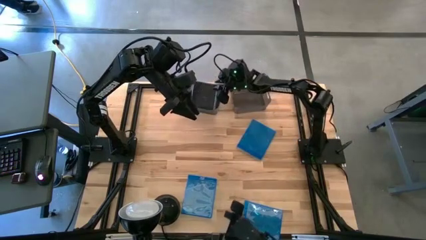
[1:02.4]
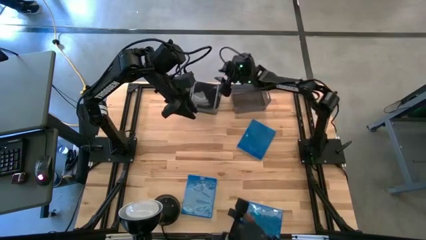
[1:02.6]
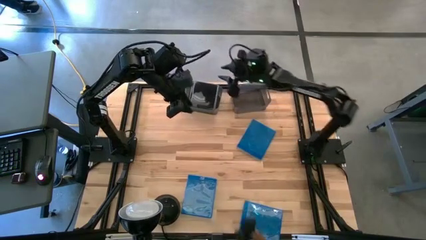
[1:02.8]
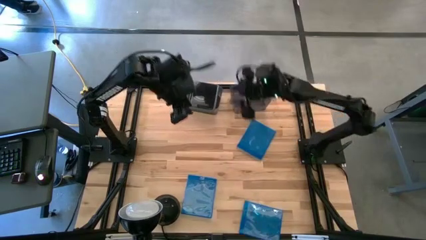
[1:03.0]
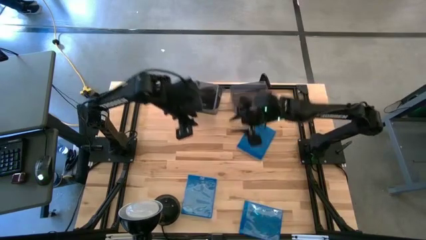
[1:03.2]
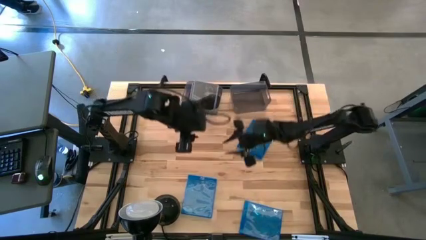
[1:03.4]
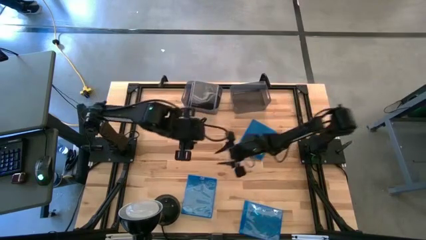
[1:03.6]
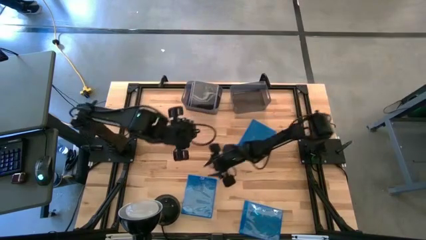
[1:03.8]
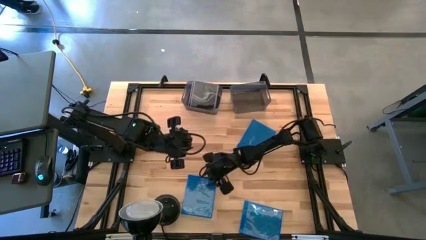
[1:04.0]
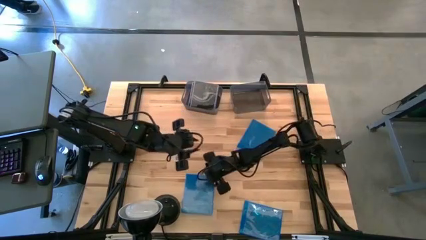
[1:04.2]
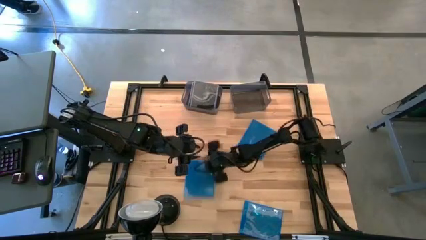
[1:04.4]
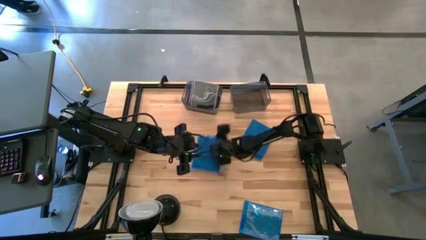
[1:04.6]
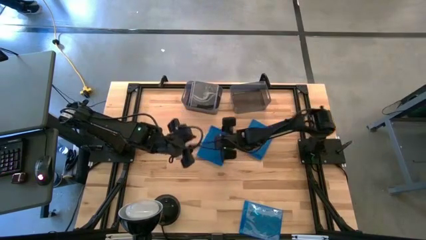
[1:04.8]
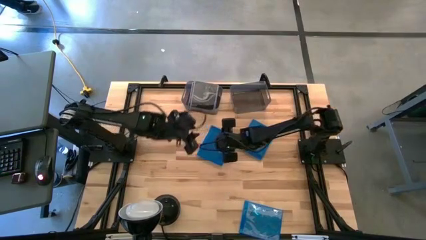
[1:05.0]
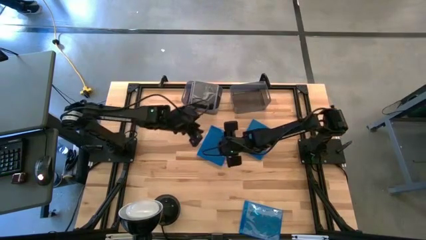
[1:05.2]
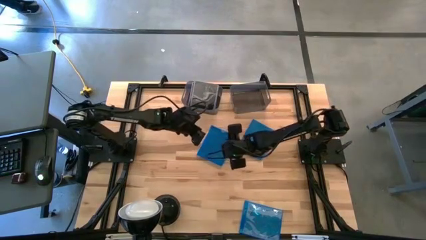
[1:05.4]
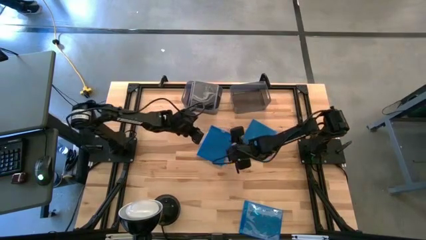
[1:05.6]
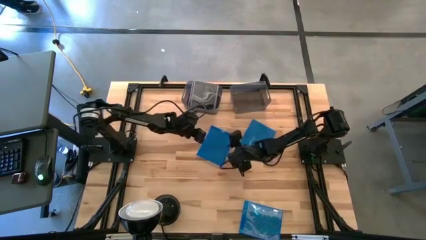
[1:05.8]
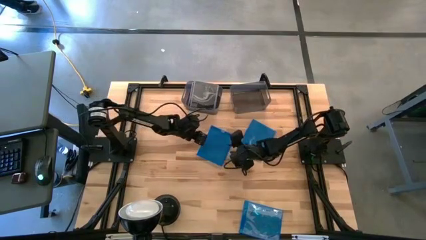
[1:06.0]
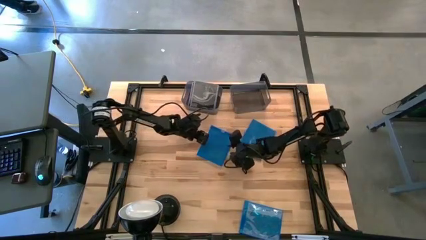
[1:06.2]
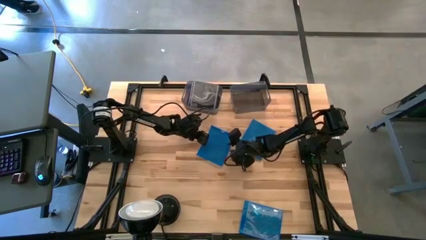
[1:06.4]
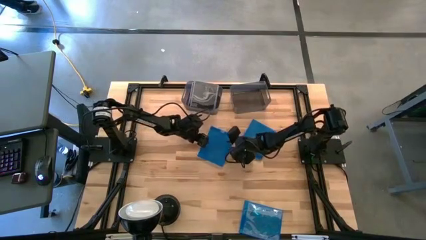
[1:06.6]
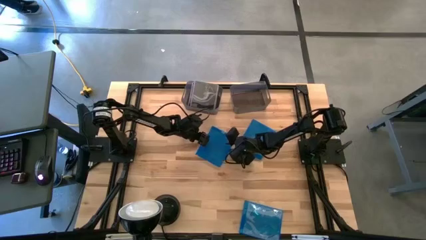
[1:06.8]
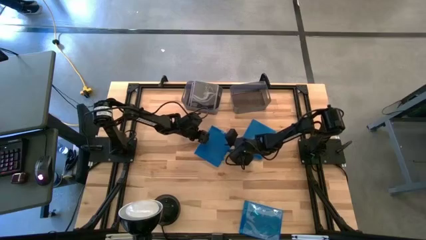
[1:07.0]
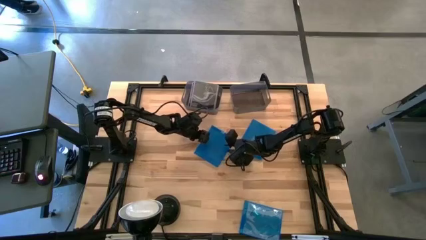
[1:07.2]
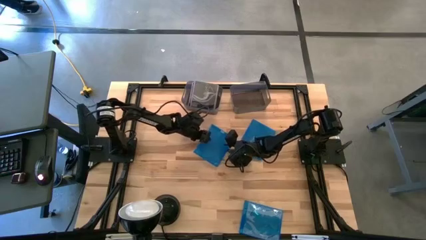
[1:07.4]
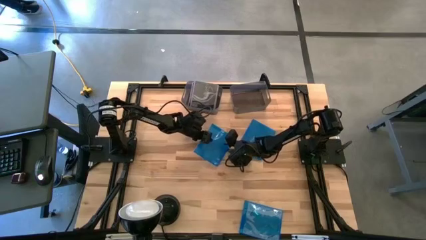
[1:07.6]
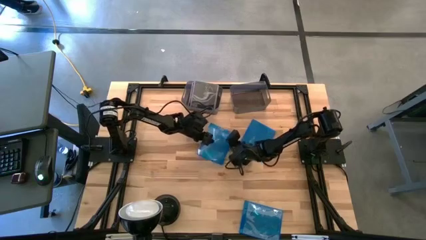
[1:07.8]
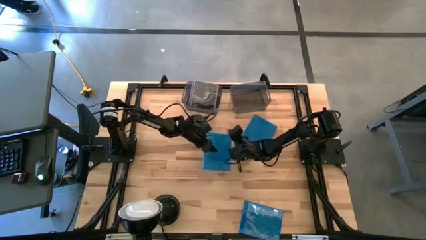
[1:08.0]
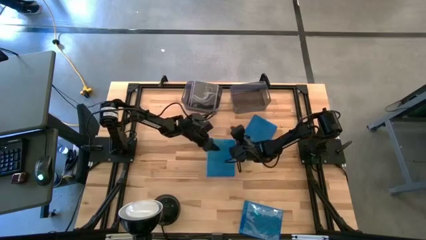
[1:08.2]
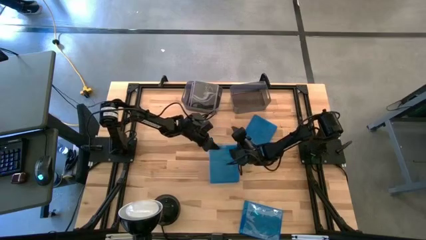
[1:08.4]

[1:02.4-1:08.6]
Task: Pick & place jewel cases by type
Put the bottom left blue cd case into the right black bin

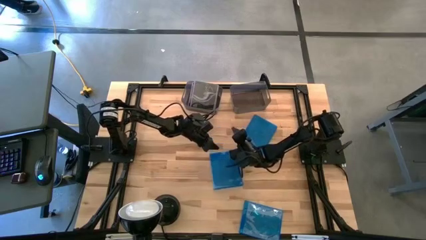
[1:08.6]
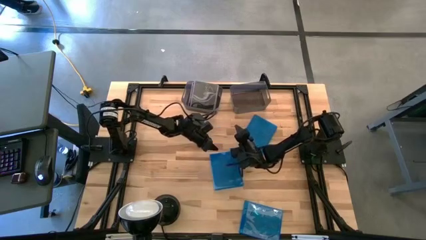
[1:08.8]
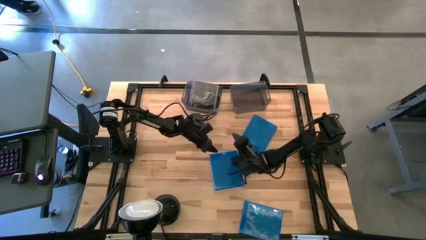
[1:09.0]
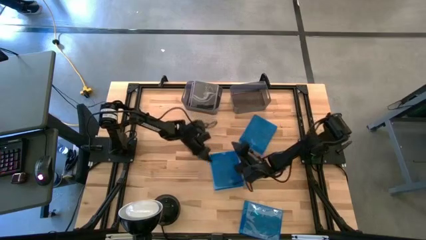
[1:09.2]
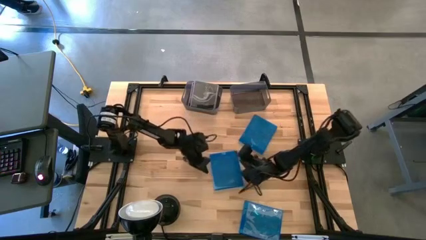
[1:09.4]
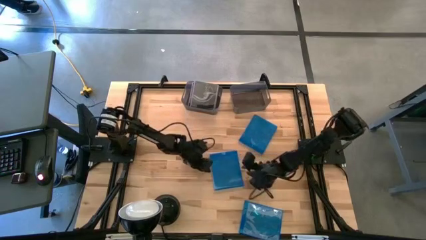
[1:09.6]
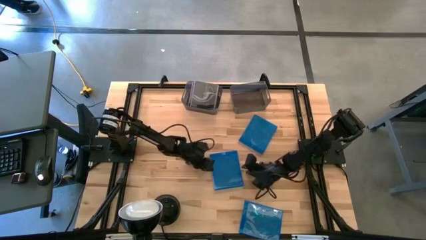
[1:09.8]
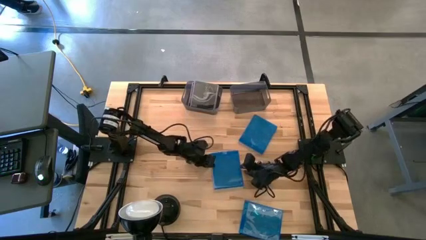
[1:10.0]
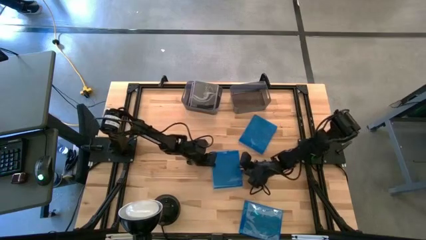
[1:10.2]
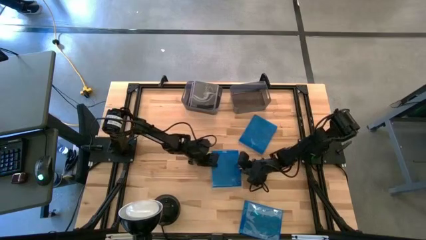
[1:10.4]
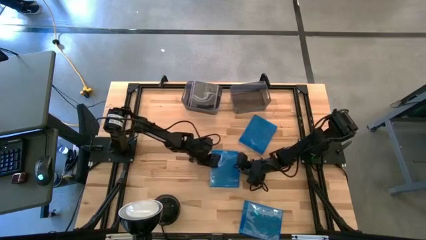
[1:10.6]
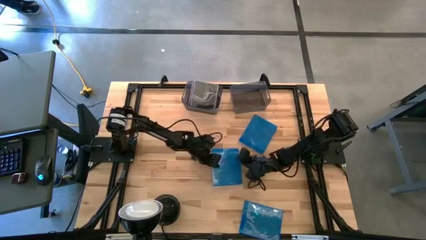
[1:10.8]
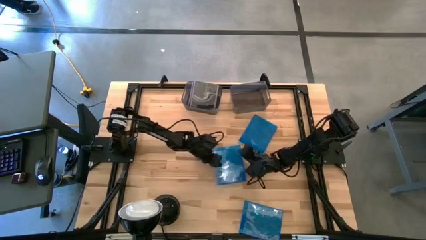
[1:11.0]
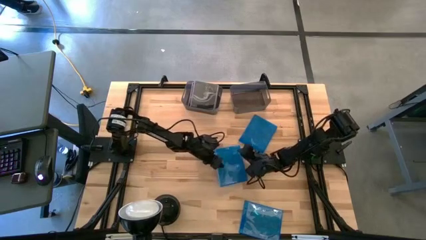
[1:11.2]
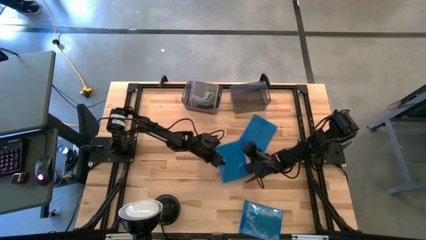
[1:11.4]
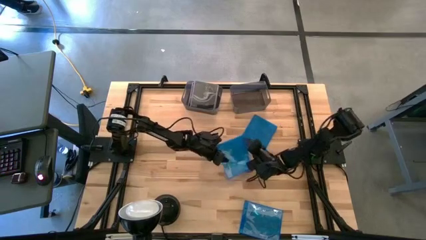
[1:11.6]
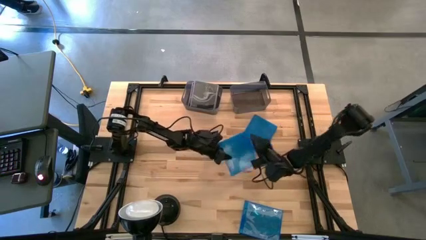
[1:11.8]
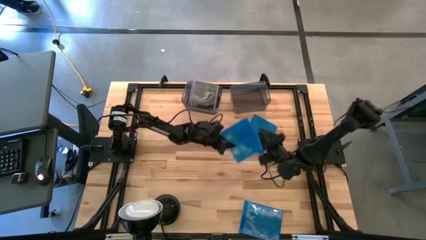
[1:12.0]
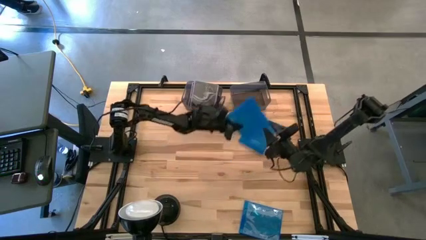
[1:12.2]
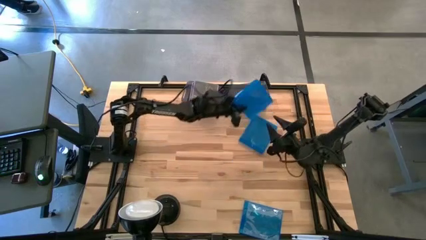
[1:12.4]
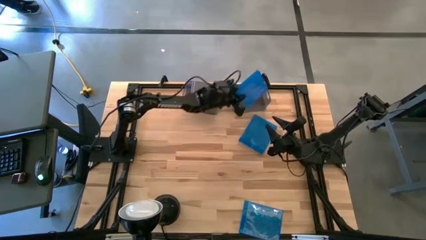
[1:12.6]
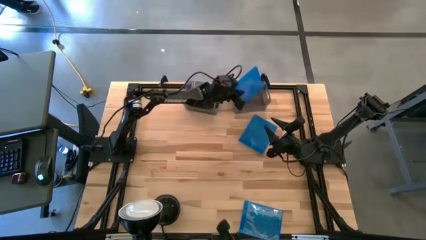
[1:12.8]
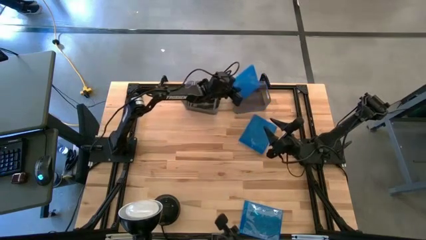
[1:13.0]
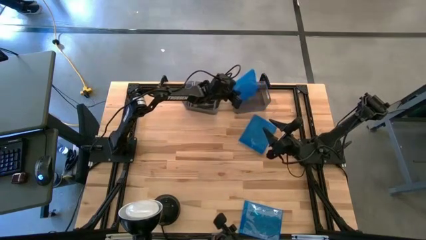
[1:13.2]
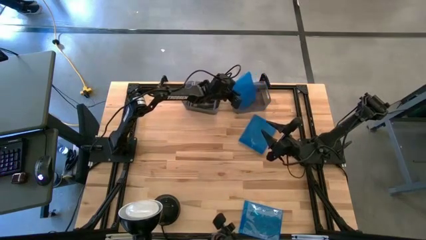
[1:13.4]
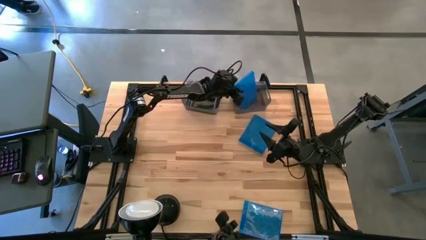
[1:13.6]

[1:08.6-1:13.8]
Put the bottom left blue cd case into the right black bin

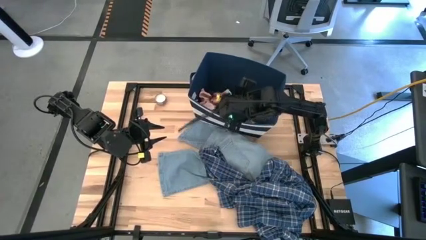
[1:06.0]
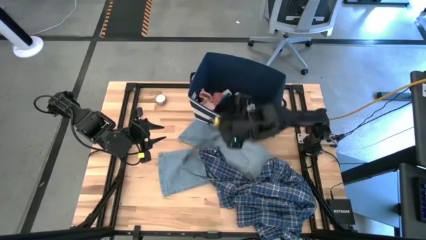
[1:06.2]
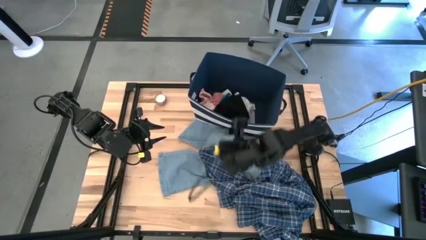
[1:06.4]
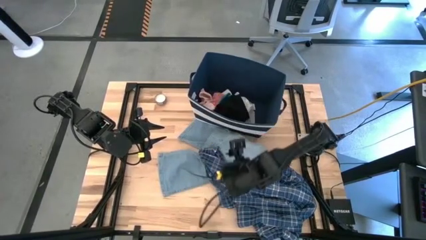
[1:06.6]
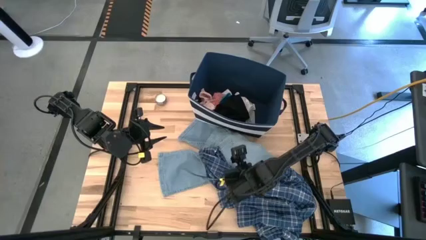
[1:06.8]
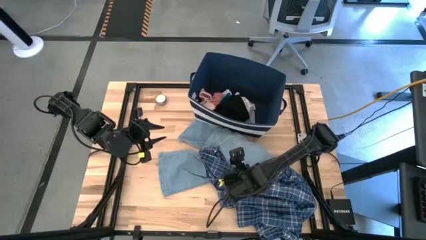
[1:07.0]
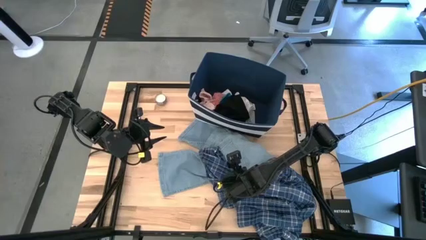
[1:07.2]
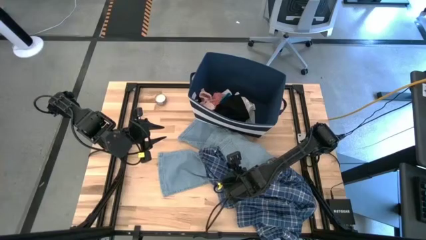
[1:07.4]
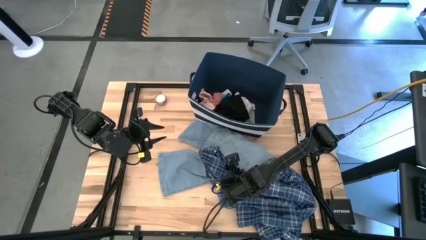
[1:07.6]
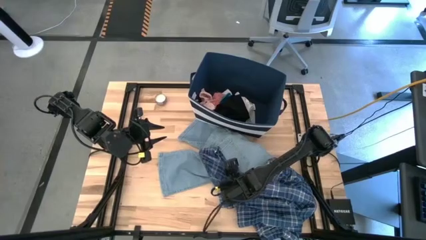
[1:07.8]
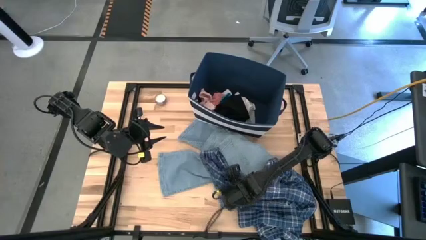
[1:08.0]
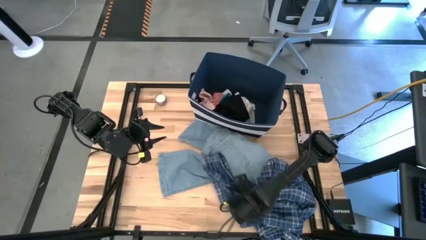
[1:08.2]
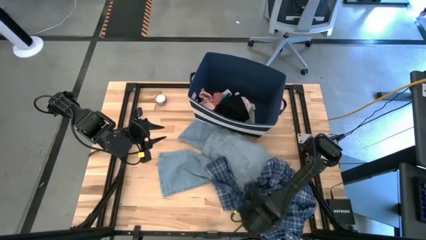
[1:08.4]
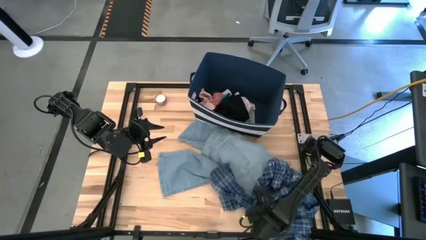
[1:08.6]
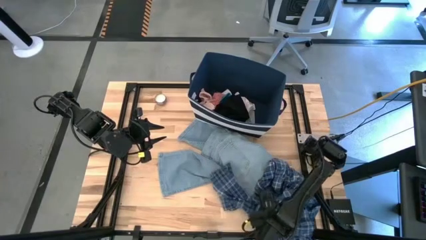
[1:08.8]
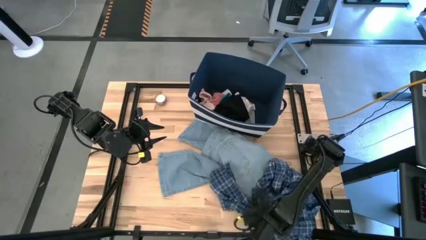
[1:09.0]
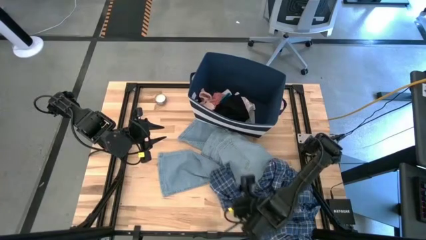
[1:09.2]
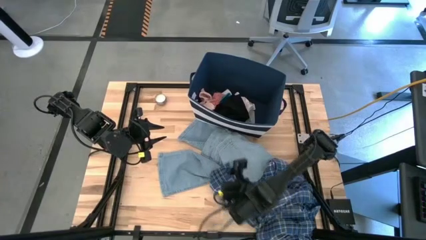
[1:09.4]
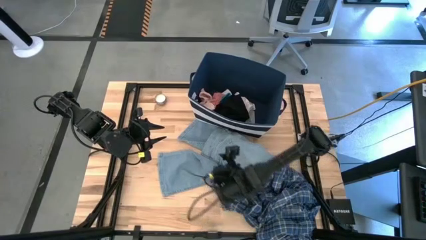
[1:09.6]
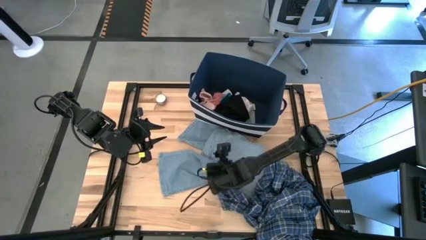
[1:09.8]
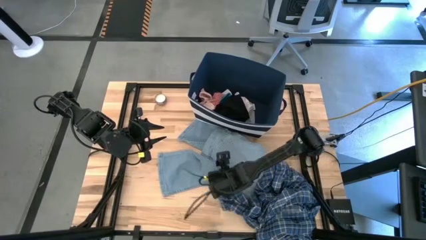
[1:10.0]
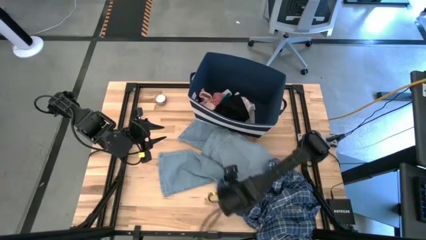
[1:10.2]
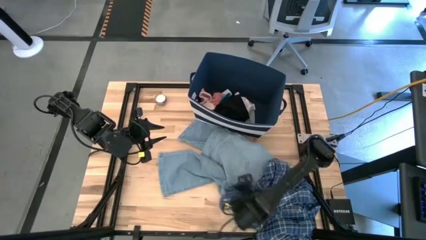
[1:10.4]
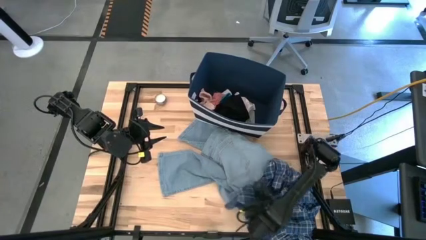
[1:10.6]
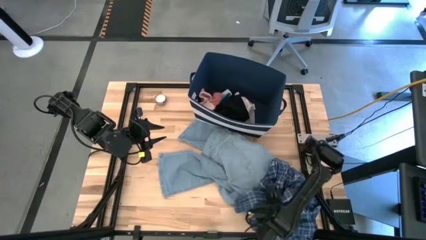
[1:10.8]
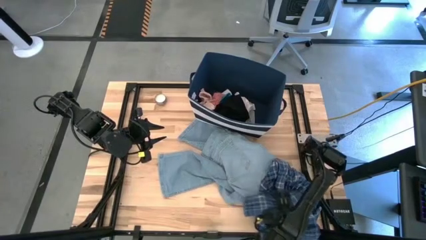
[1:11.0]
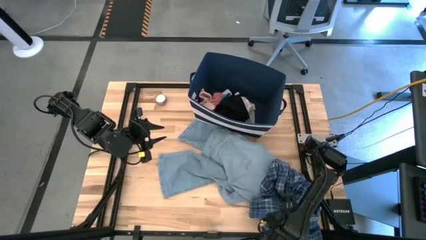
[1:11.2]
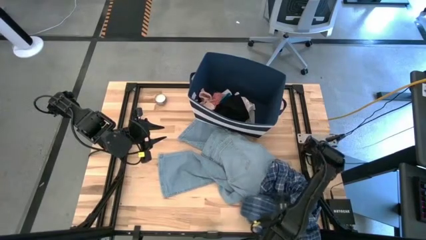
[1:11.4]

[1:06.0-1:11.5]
Task: Sort clothes
Move the blue and white pants to the bottom right of the table
